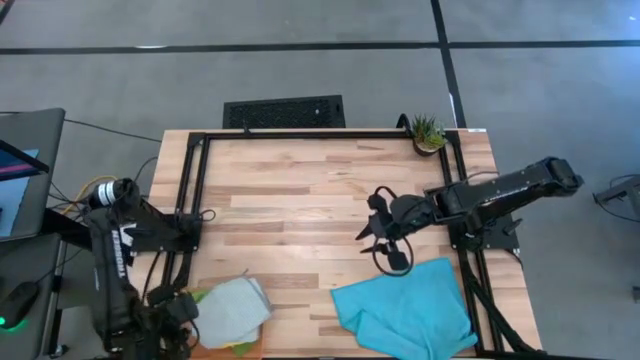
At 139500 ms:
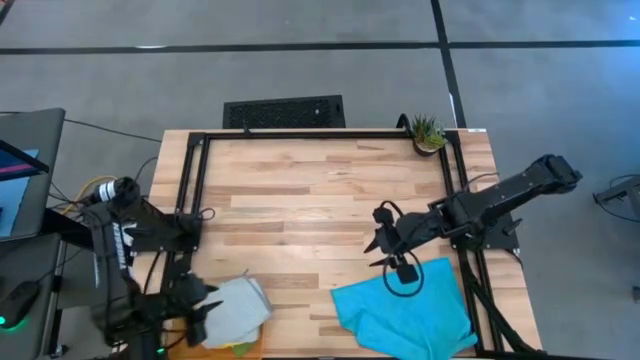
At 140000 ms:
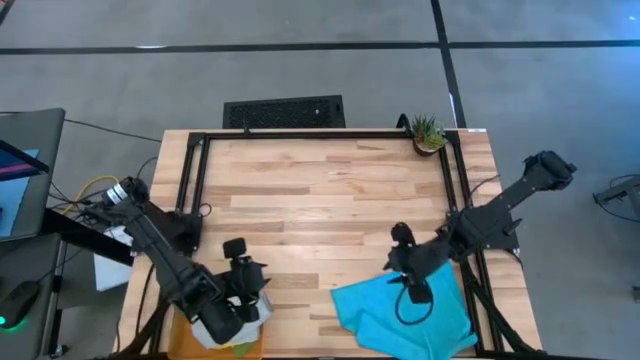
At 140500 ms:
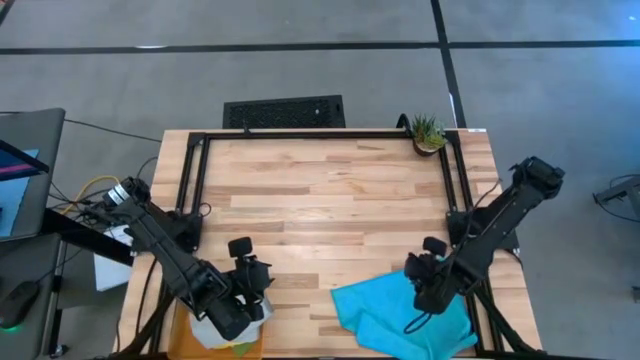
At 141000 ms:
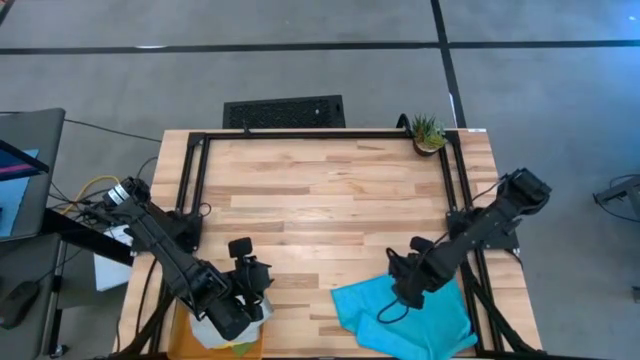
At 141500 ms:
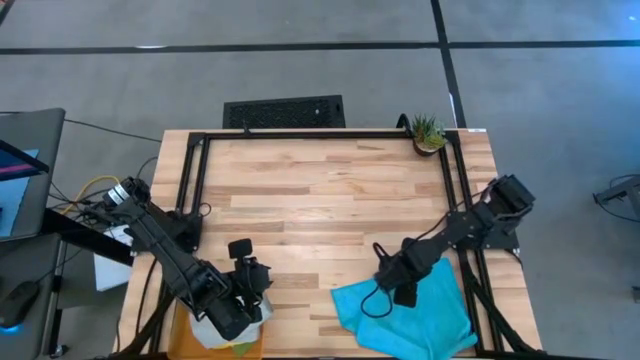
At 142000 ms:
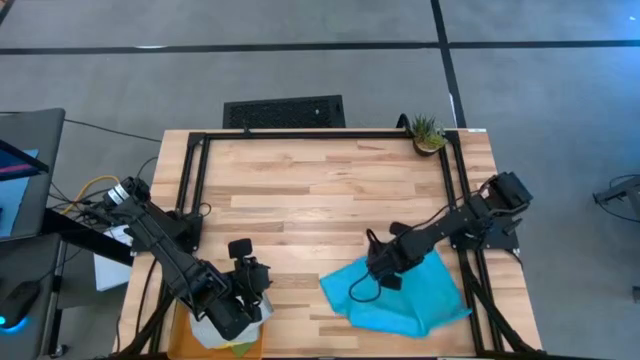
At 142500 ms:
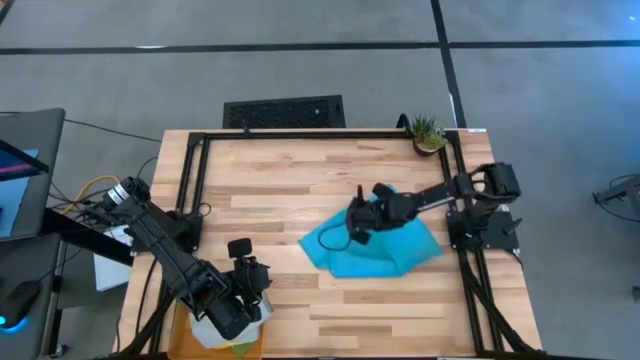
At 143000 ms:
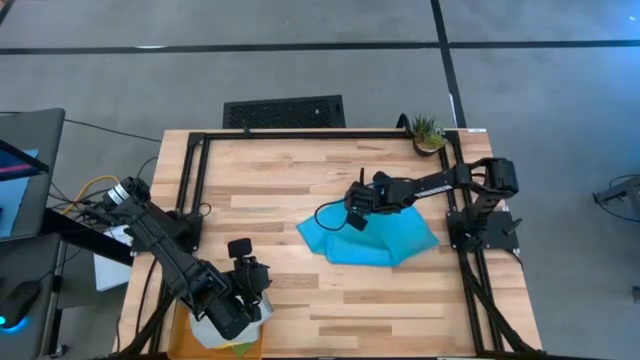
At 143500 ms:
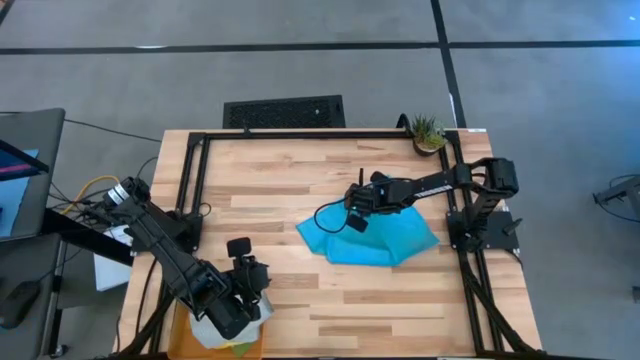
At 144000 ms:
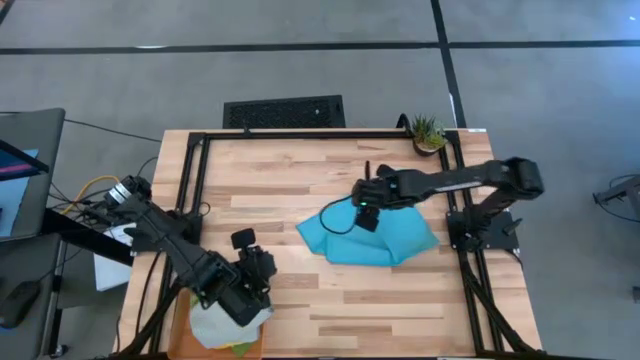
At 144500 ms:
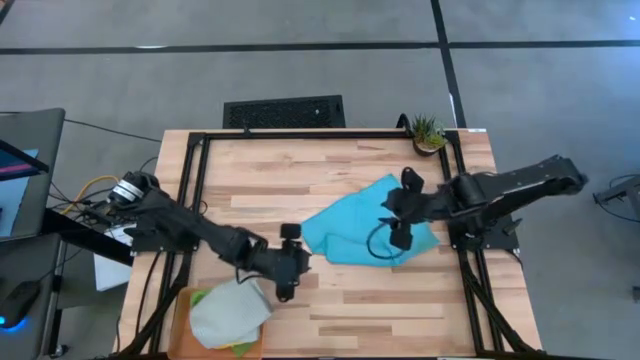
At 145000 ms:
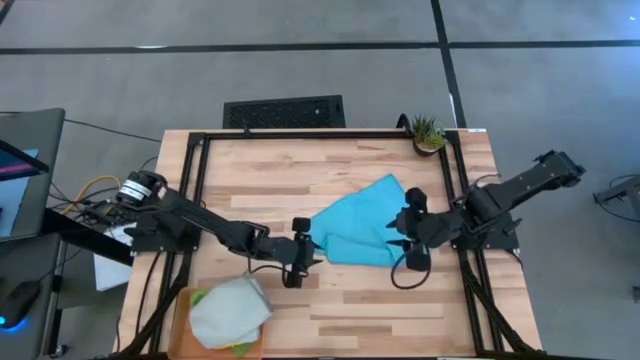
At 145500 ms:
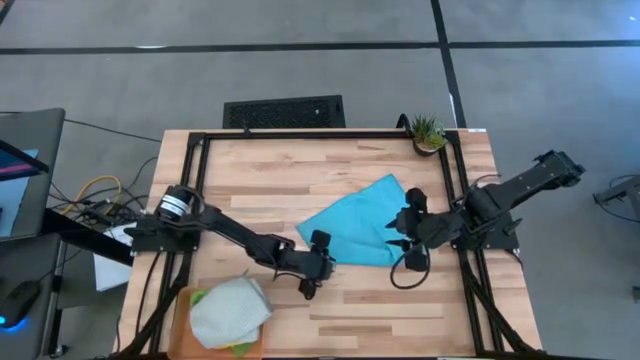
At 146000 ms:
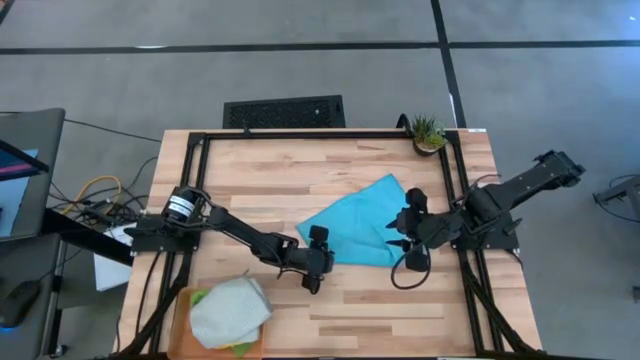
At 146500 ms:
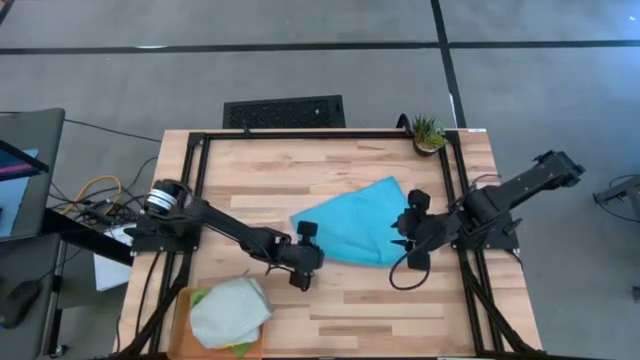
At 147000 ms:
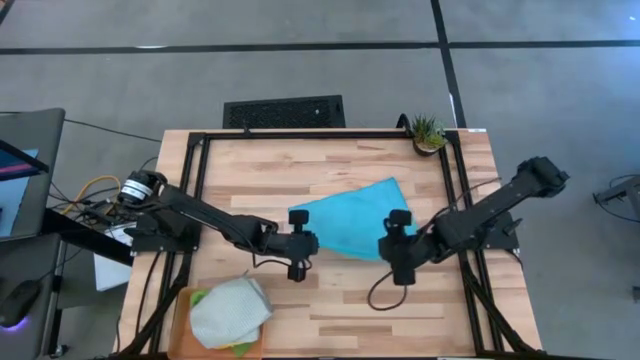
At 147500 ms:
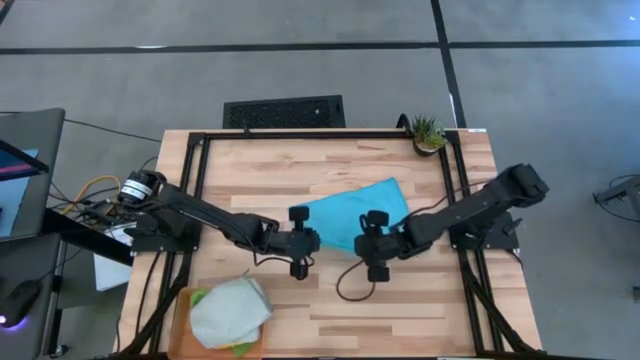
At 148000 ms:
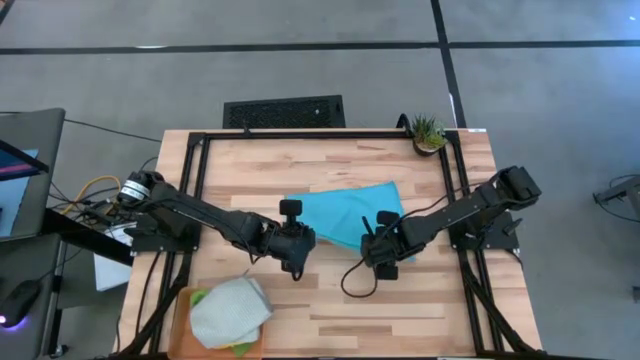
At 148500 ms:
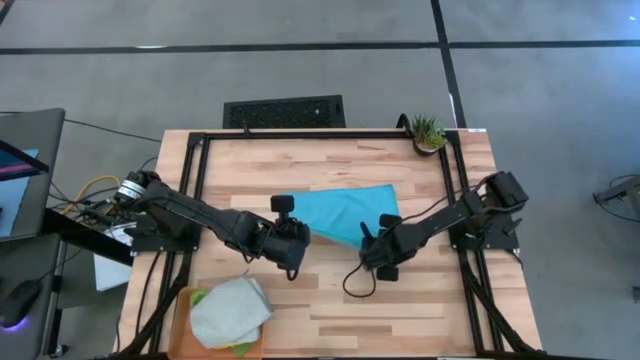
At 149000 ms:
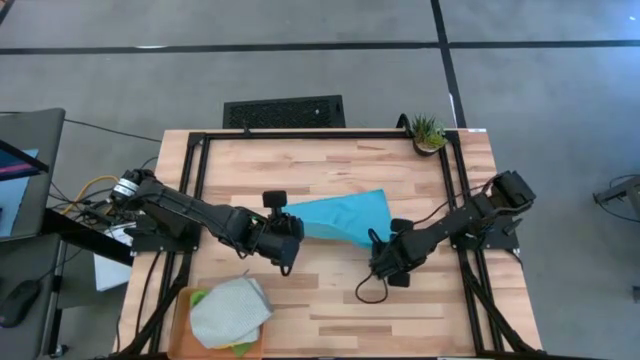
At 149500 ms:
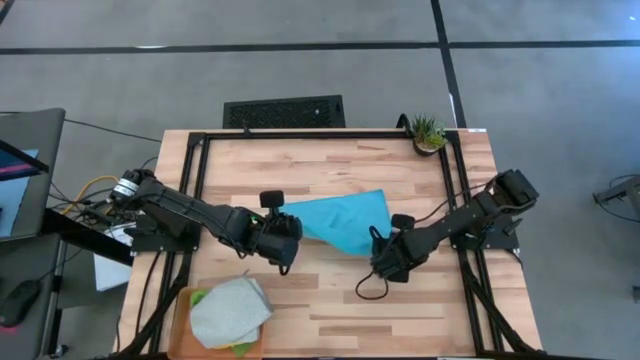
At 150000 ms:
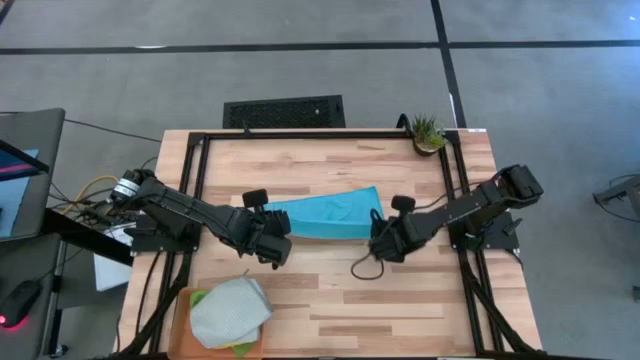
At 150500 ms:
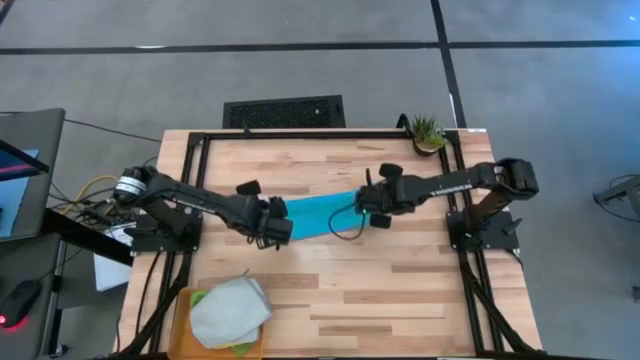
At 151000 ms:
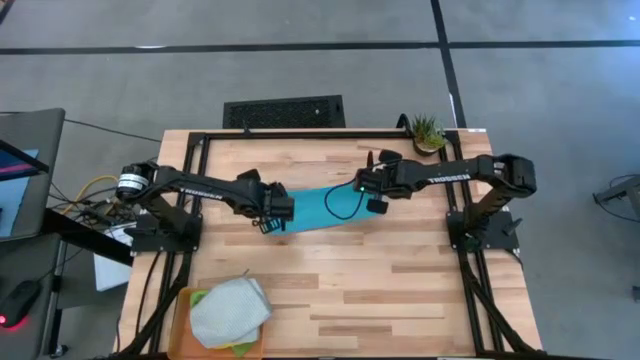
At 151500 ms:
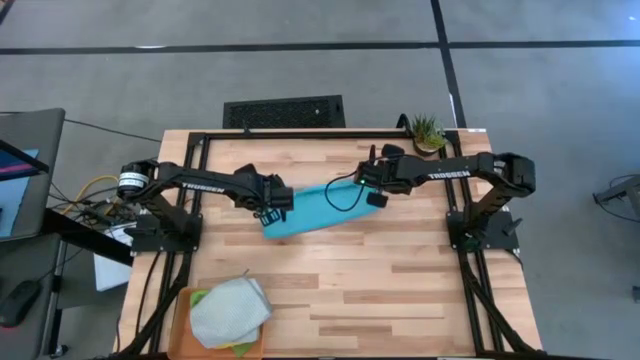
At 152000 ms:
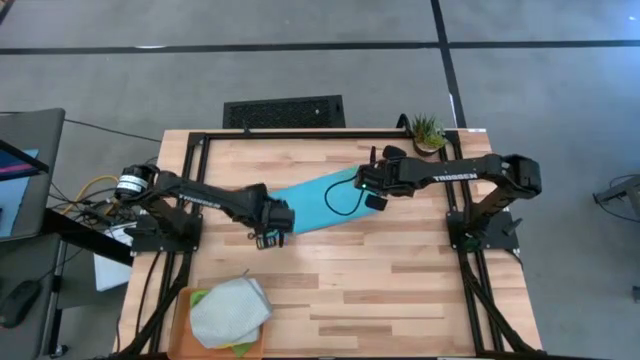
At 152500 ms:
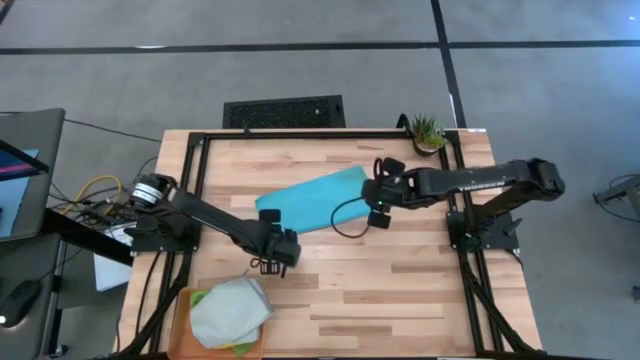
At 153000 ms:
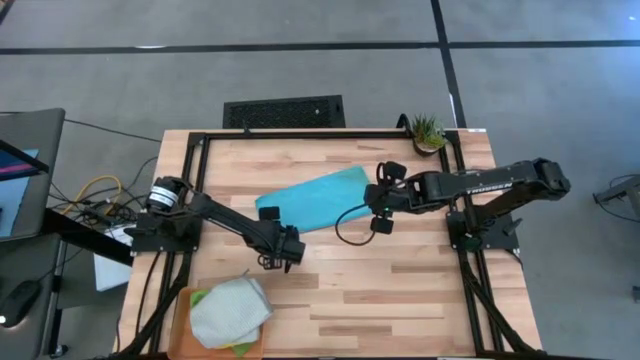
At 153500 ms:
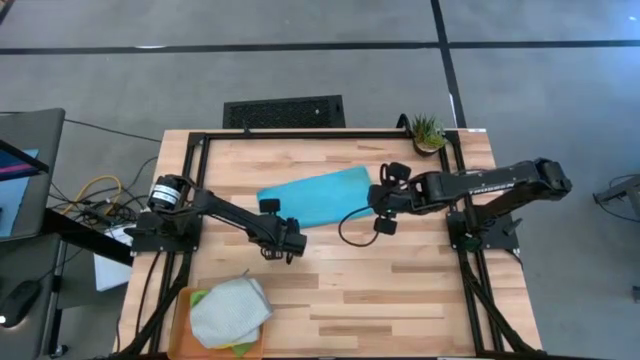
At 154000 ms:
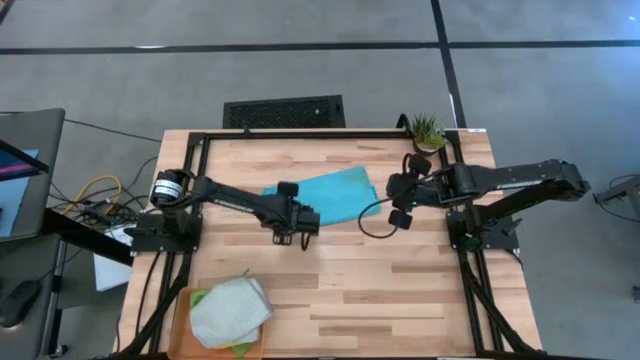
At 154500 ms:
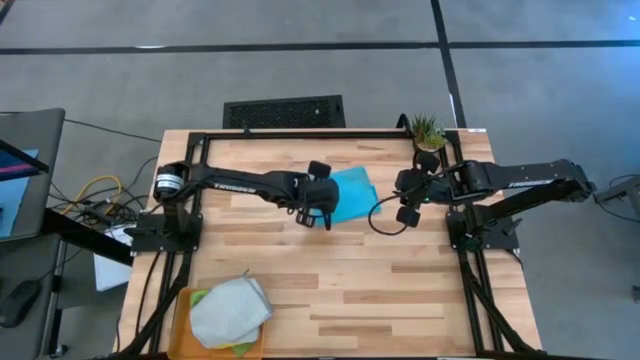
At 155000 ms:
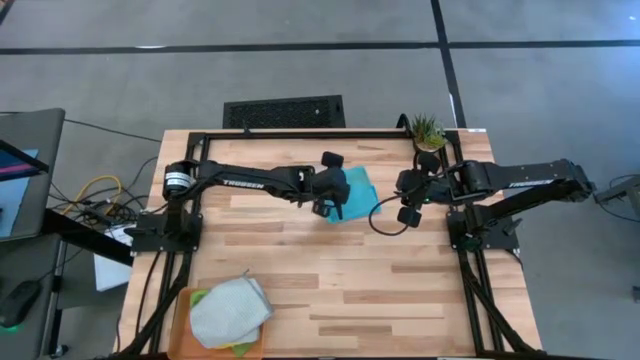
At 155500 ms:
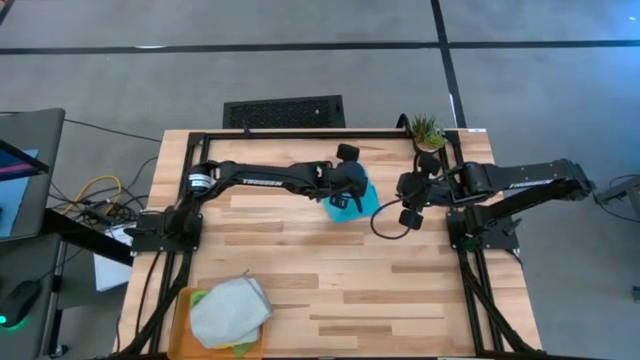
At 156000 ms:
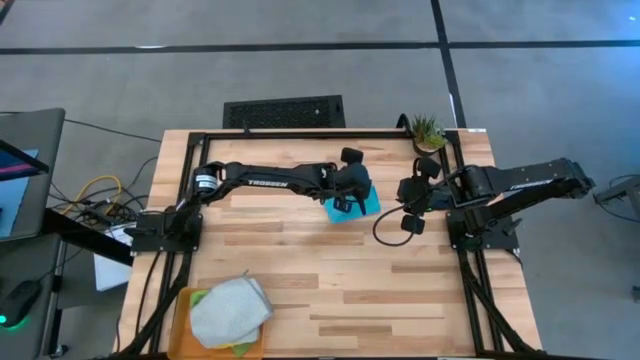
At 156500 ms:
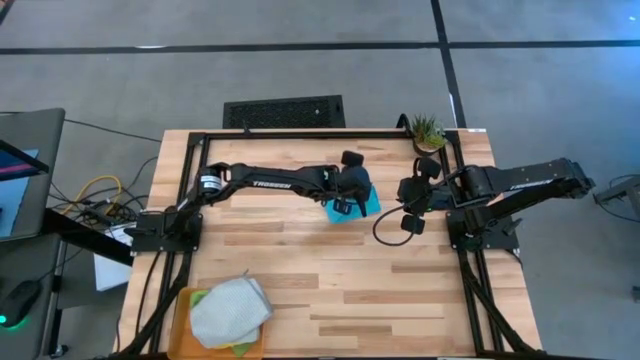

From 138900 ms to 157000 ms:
Task: Fold microfiber towels
Fold the blue towel
